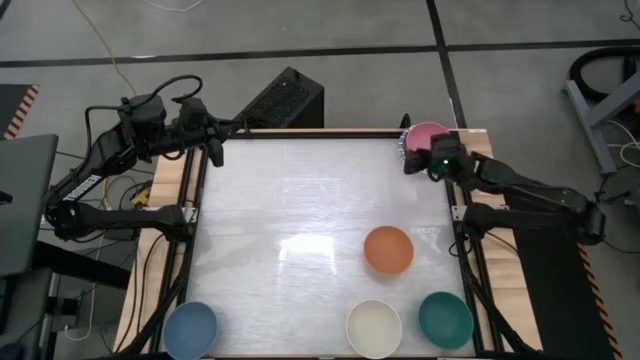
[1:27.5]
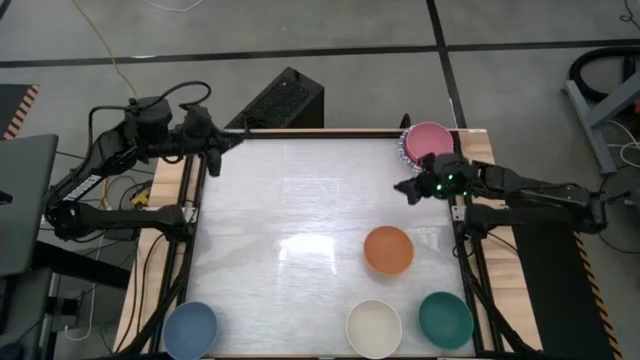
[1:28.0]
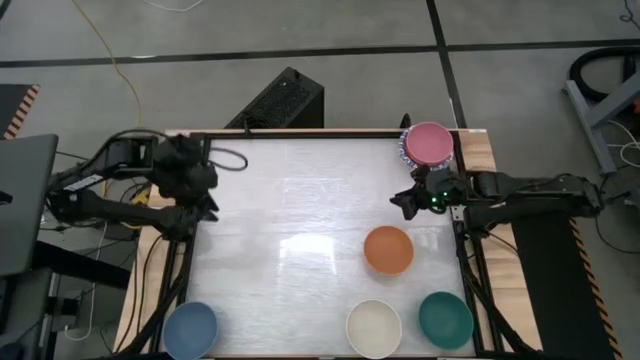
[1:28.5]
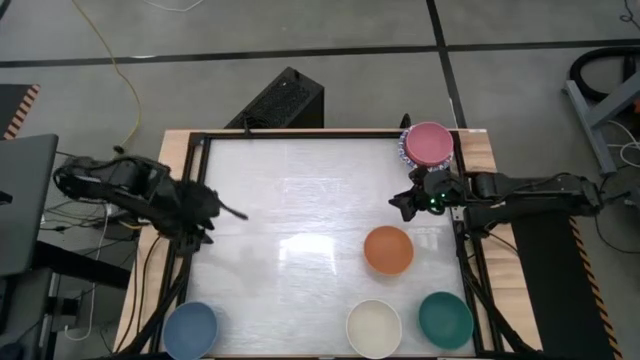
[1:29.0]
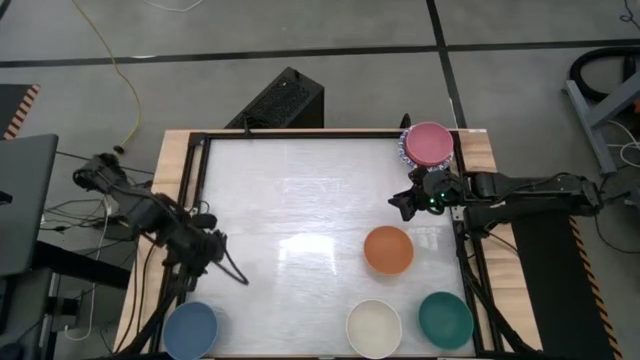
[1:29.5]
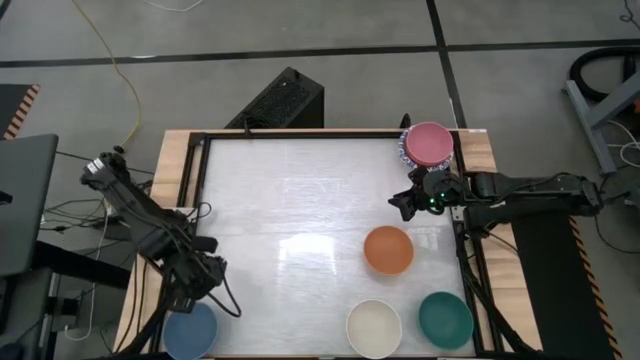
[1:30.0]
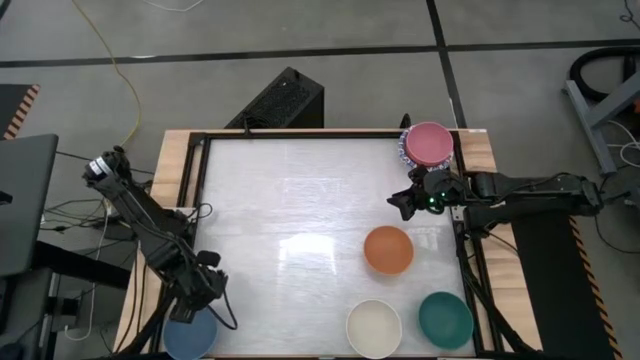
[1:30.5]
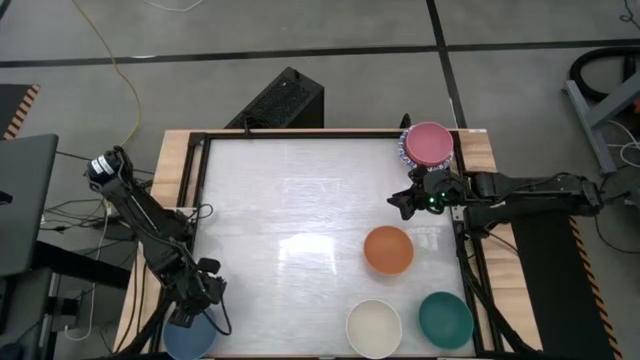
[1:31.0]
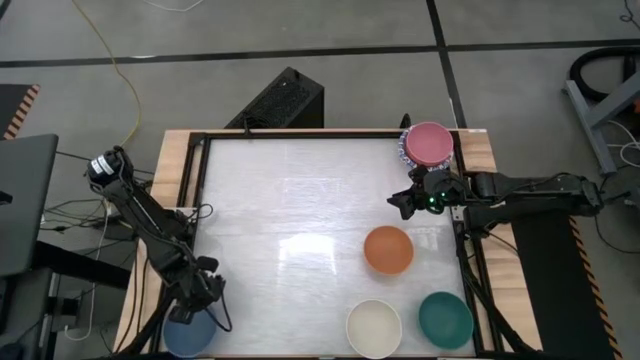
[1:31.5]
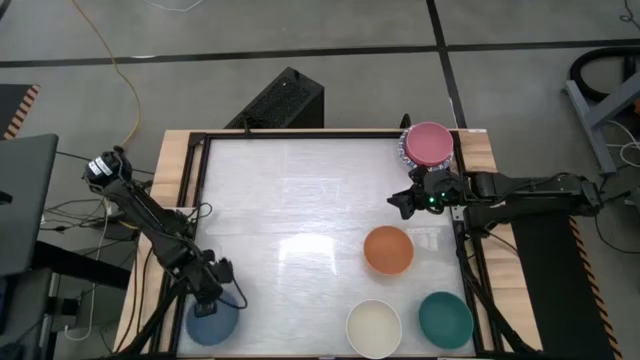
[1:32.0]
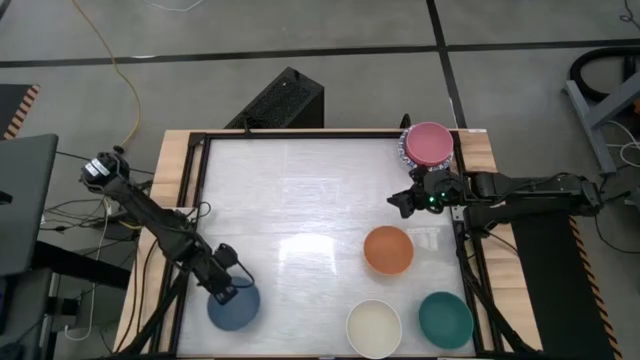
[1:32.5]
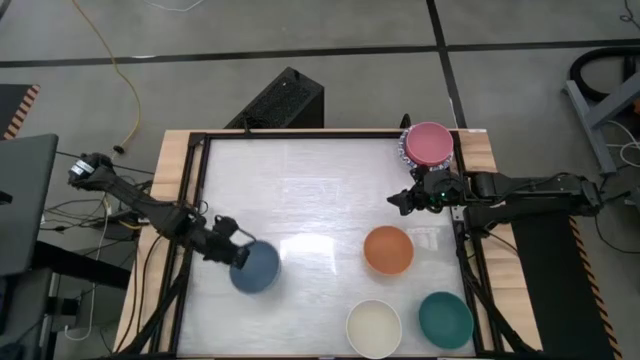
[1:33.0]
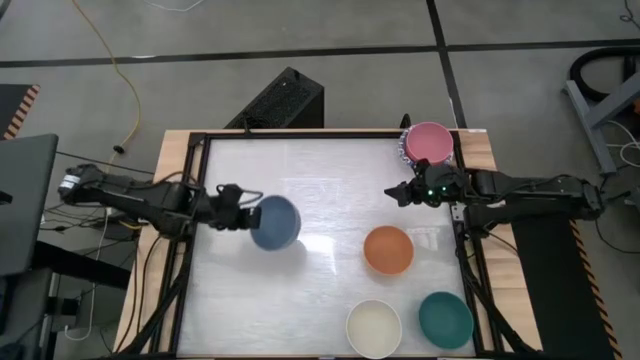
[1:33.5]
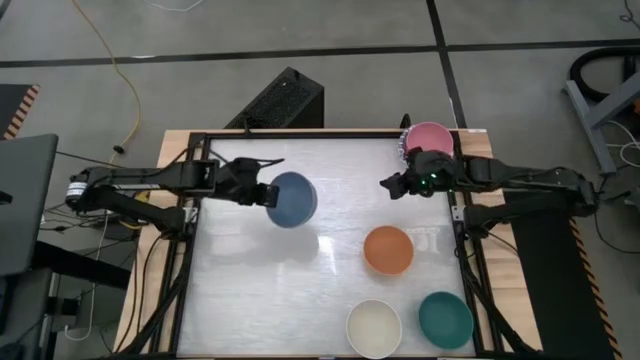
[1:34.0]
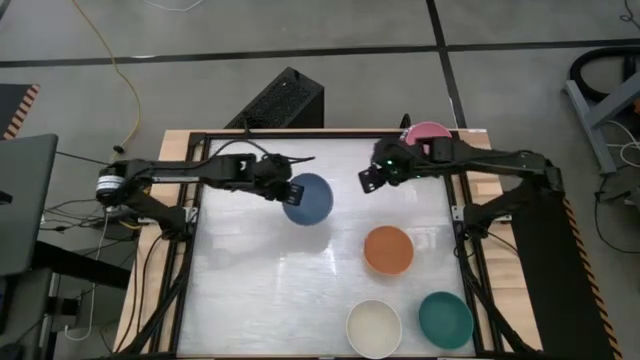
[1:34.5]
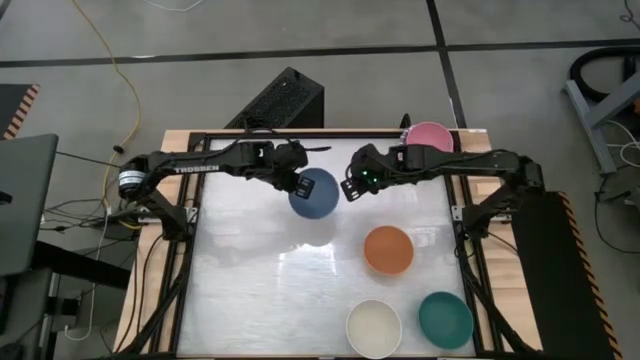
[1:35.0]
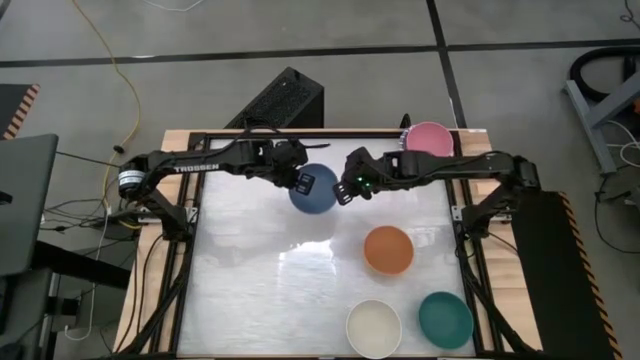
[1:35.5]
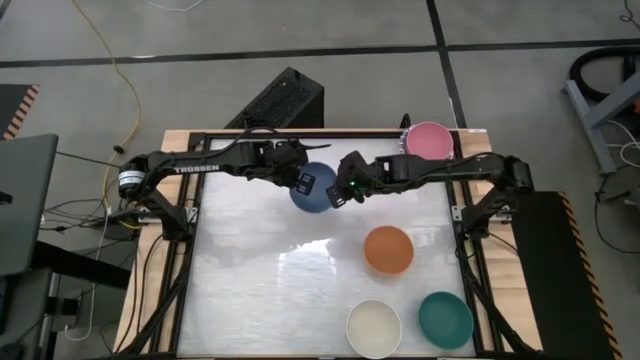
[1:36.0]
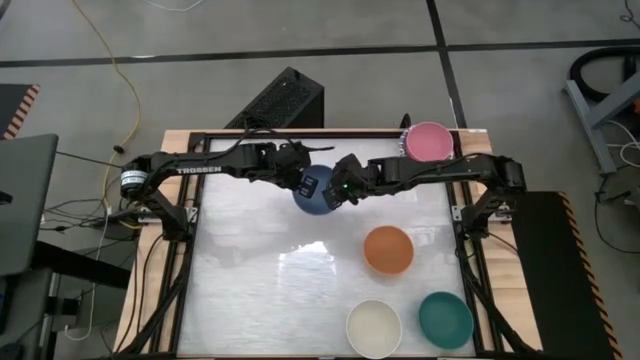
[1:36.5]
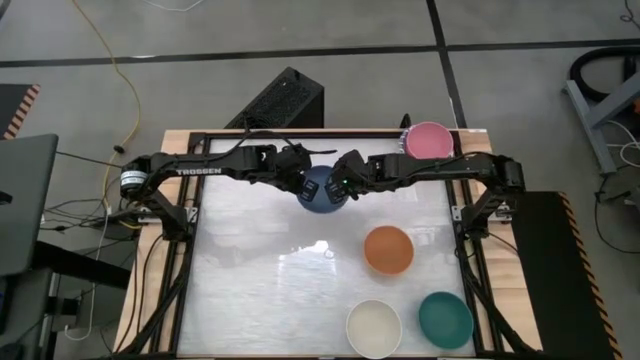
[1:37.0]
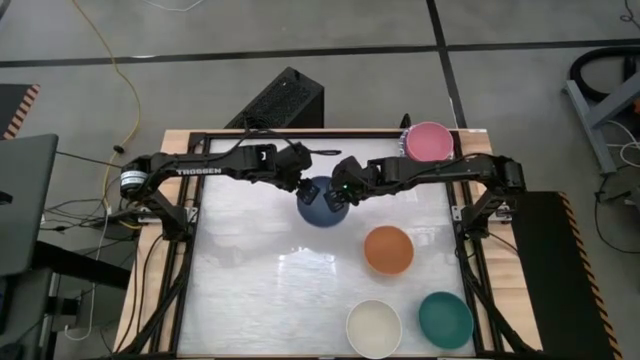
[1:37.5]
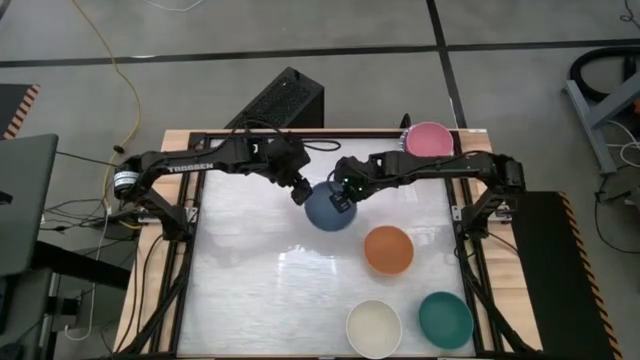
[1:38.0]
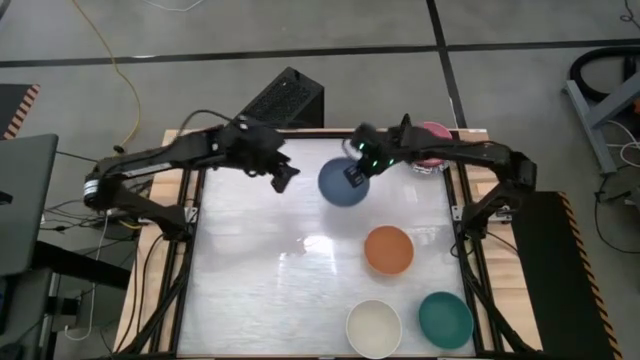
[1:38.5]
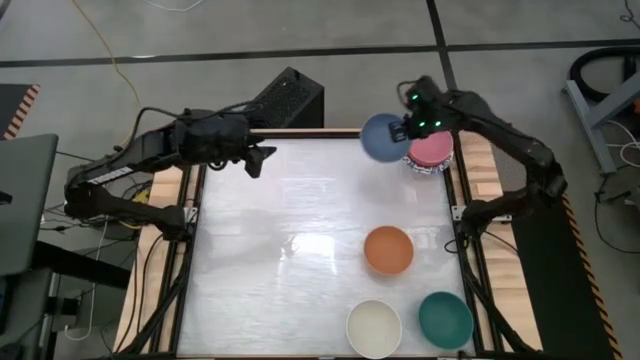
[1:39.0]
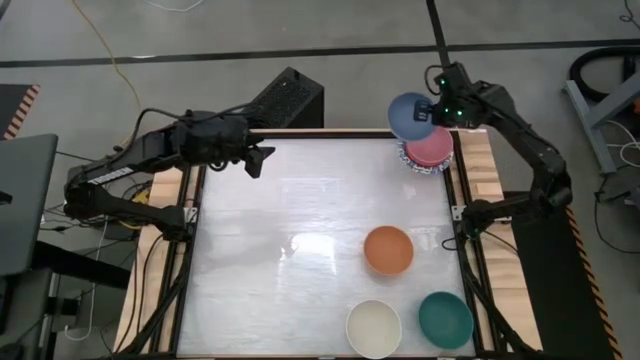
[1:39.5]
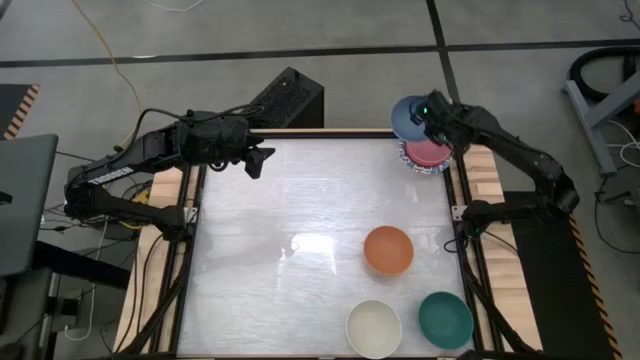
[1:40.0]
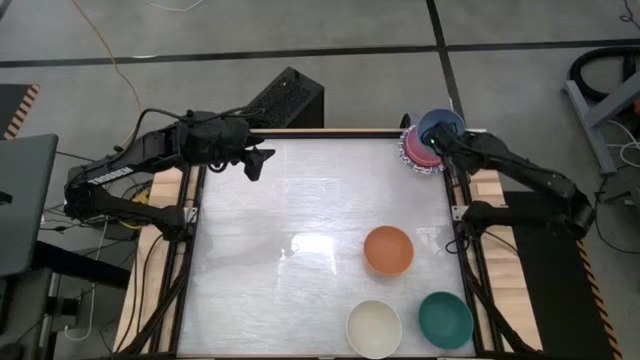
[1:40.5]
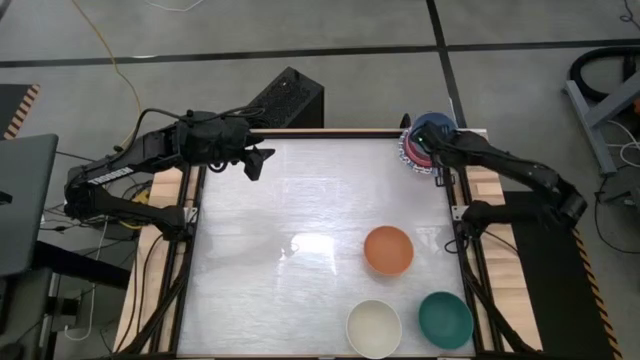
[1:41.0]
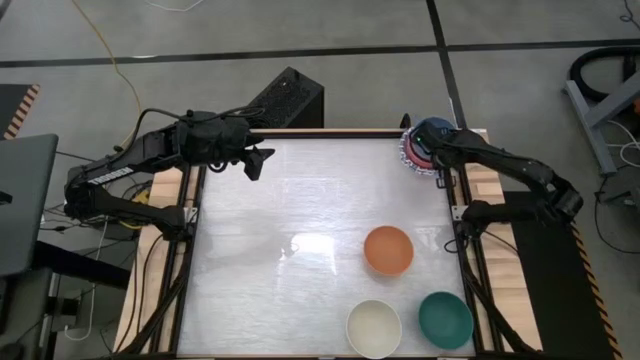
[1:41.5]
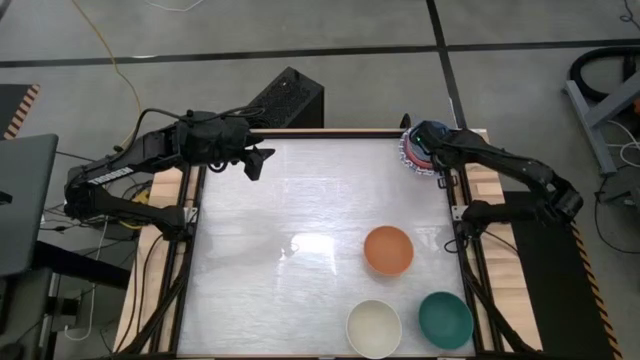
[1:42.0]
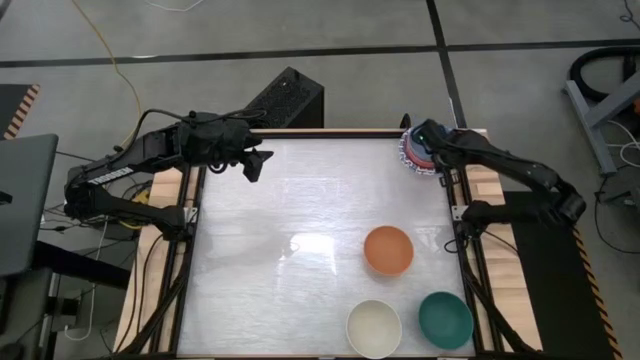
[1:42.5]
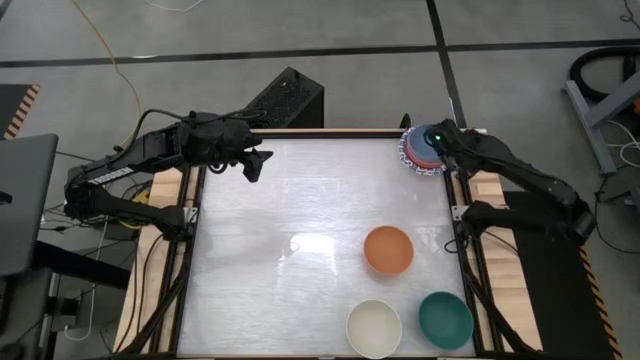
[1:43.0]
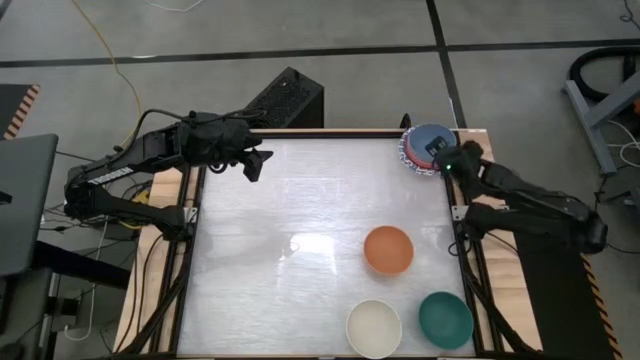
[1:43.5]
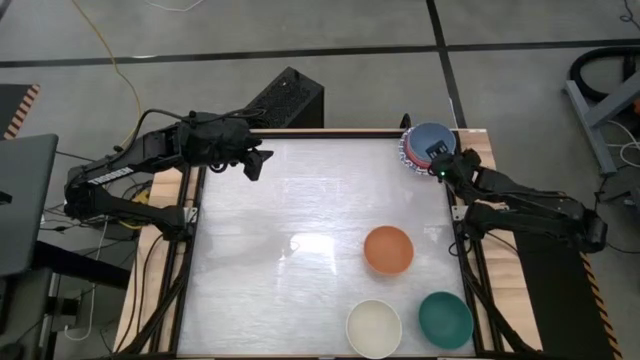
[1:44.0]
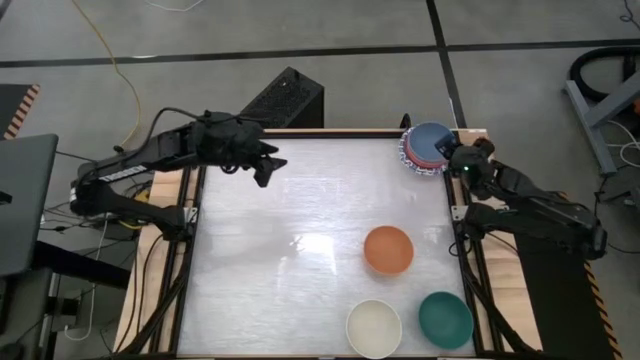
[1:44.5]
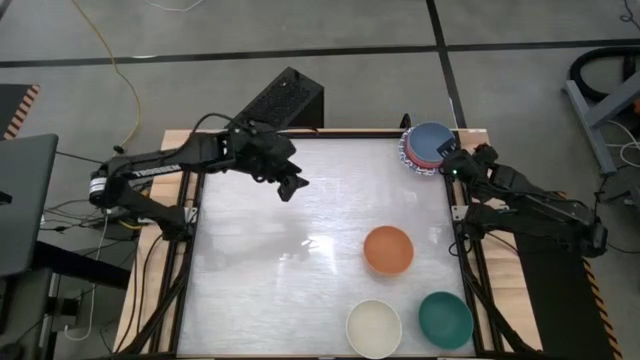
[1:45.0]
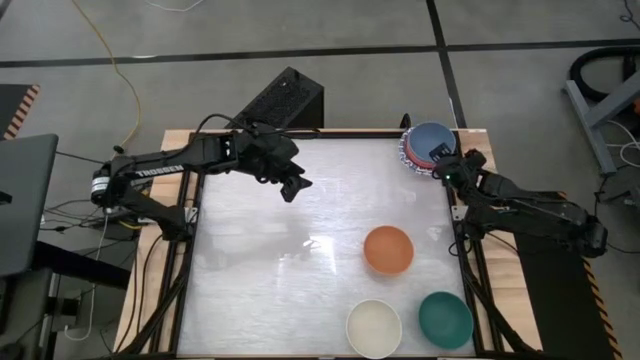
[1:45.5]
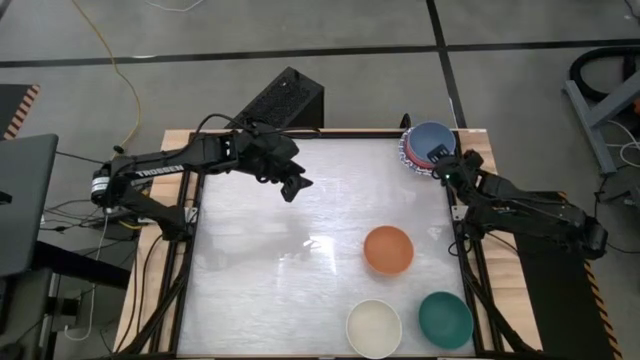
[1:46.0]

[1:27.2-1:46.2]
Stack the blue bowl on top of the pink bowl
